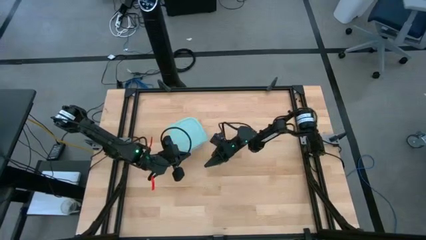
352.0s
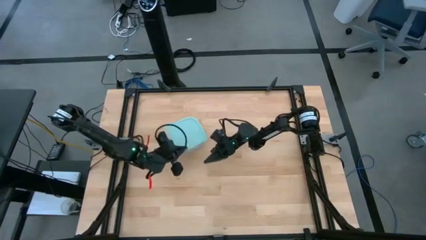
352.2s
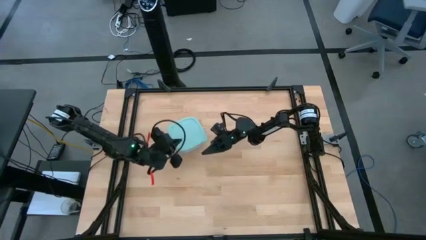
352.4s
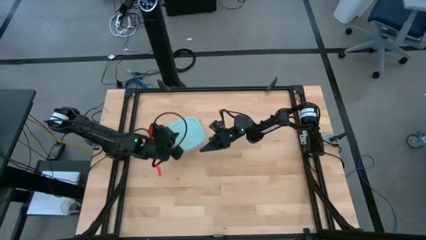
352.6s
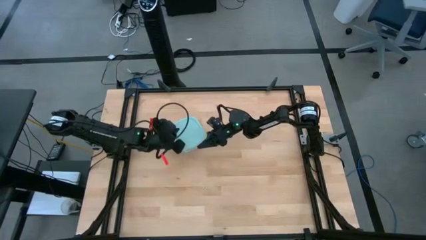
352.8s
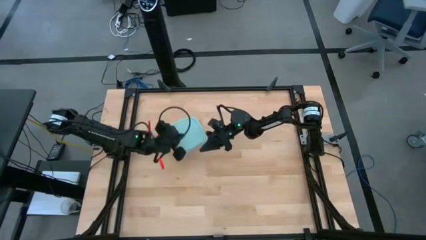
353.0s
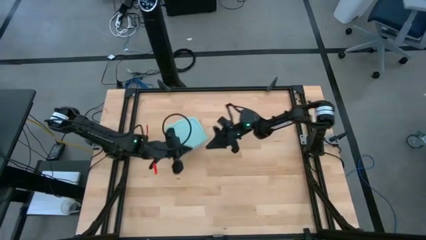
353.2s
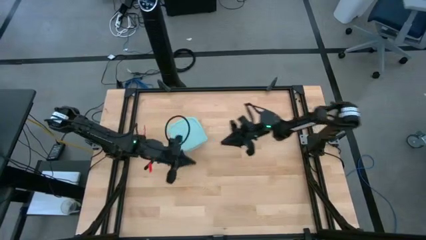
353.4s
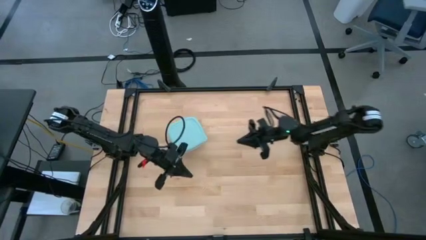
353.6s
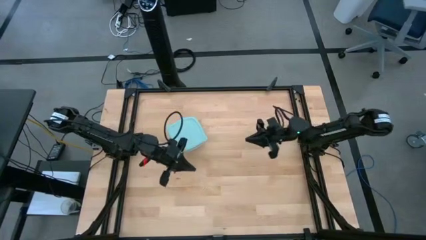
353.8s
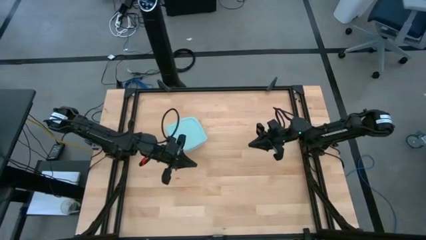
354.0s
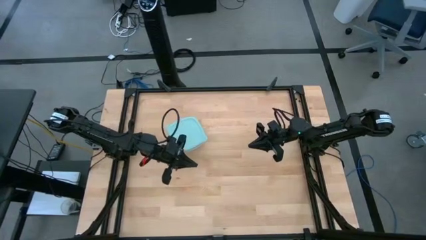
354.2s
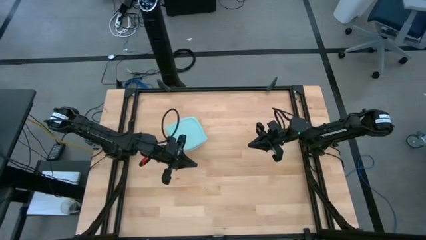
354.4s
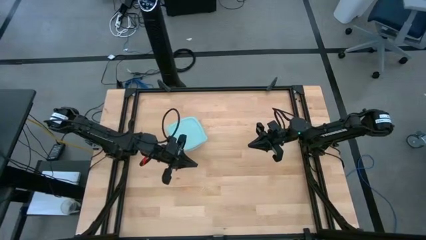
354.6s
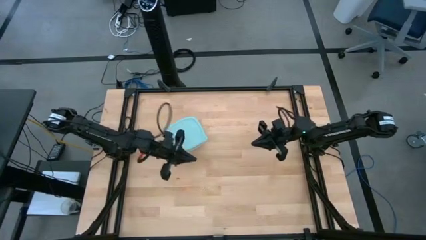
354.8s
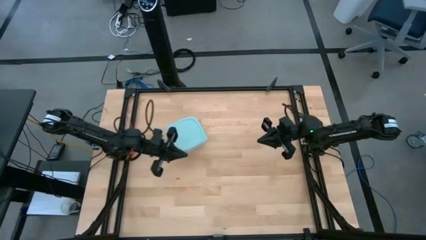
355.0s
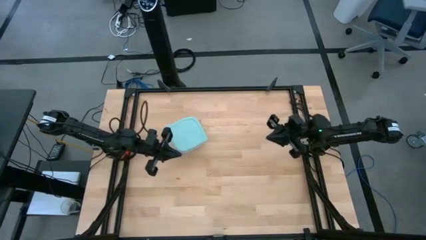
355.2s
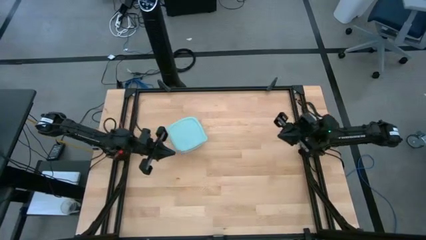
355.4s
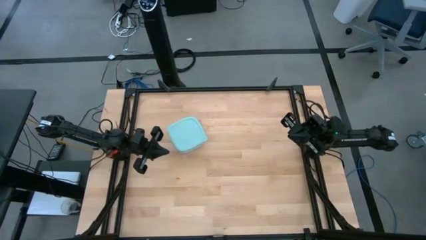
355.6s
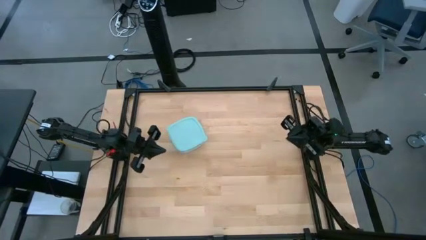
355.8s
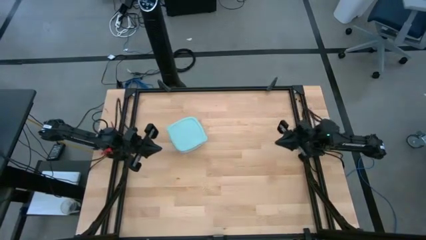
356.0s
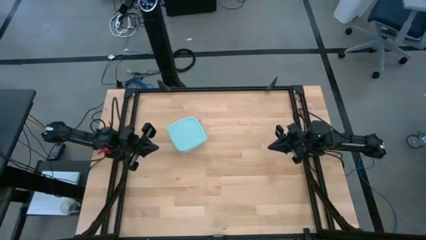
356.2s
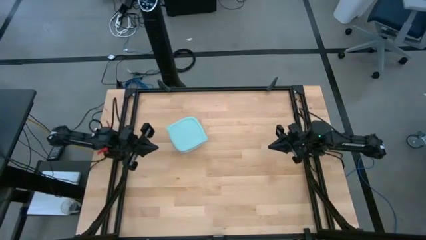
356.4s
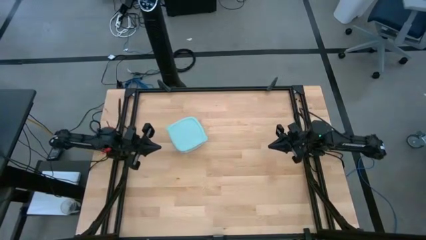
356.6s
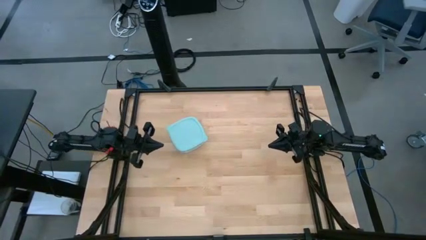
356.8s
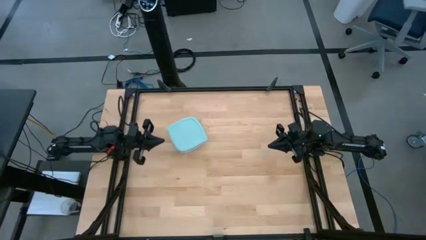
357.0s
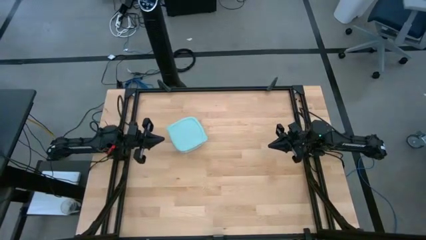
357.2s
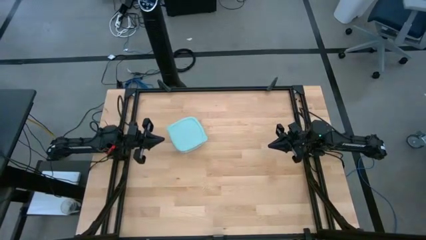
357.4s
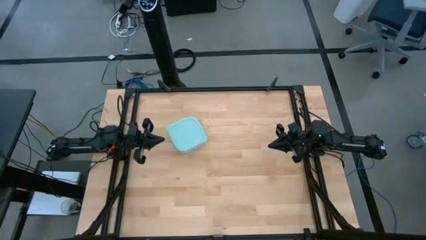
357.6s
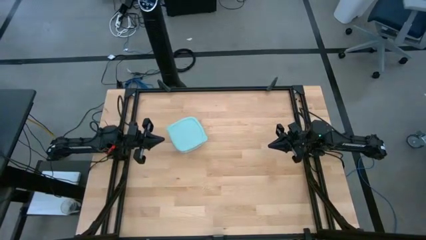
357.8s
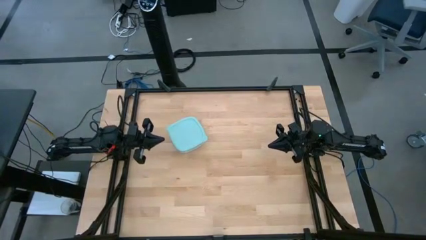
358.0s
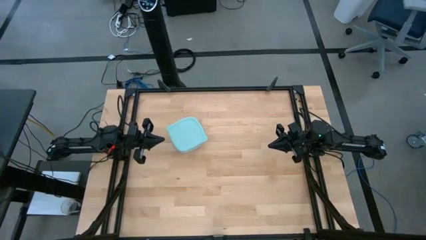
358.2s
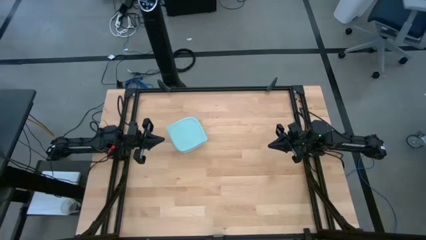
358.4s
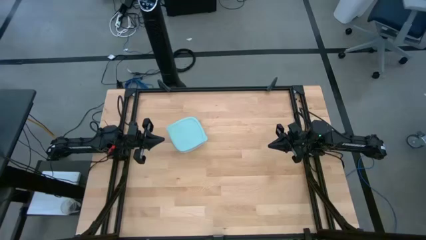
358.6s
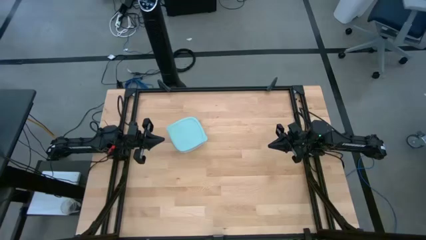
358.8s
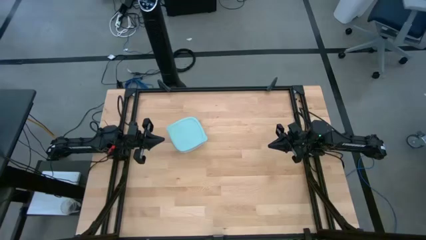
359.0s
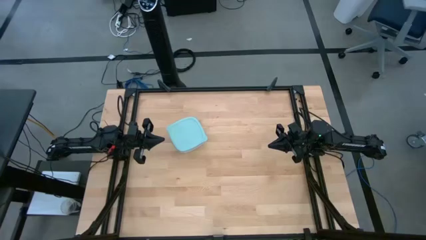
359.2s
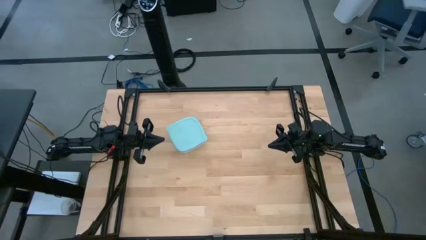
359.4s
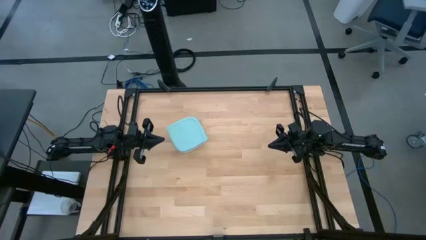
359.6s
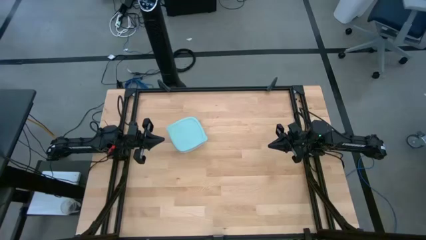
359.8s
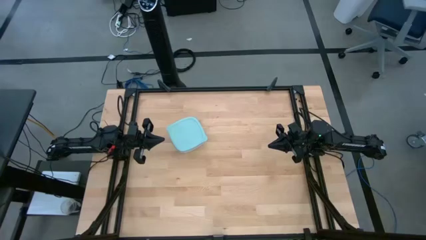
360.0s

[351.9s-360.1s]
Task: Roll bandage
Return to Home Position

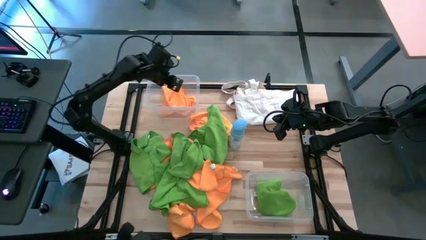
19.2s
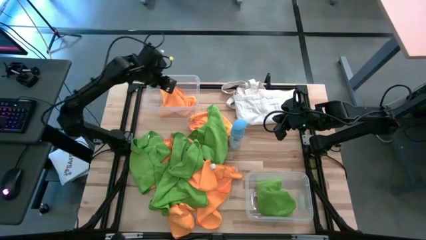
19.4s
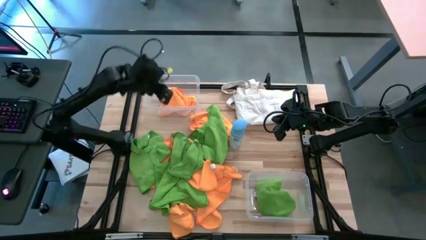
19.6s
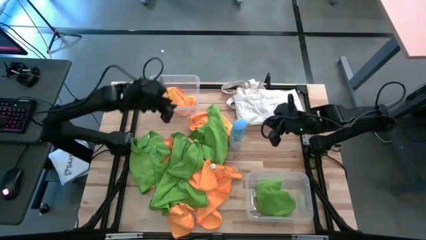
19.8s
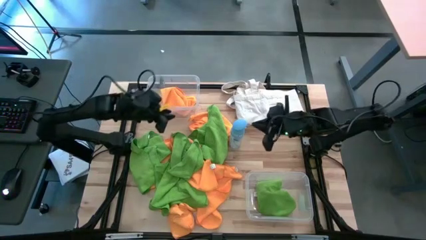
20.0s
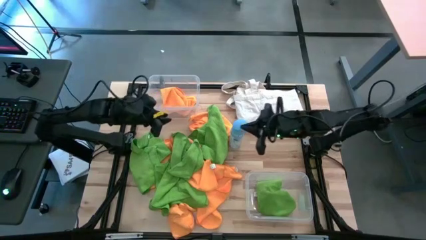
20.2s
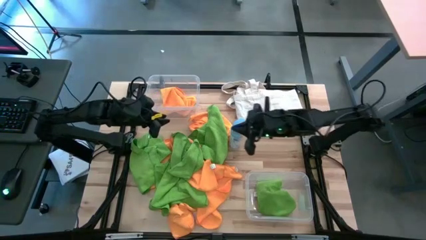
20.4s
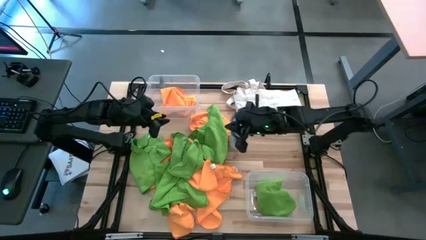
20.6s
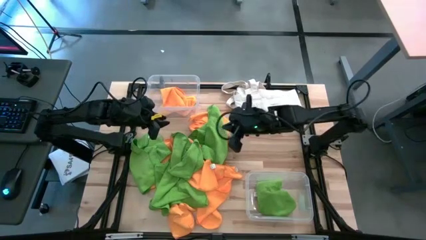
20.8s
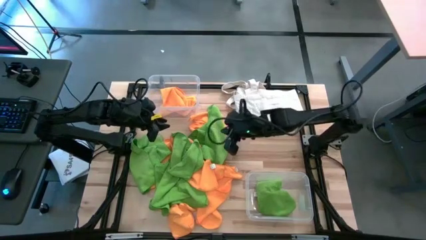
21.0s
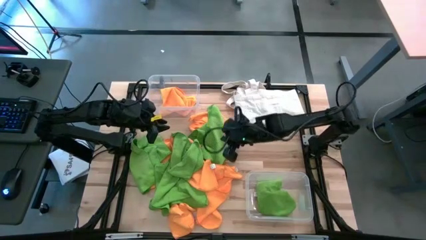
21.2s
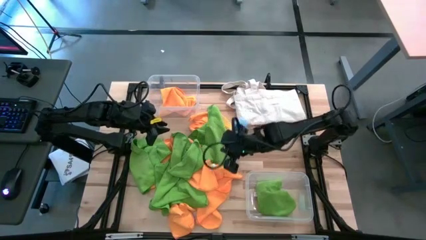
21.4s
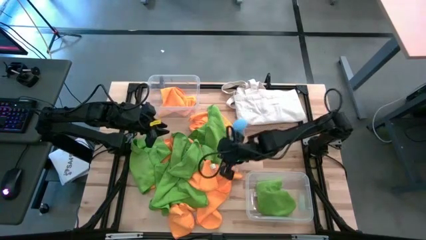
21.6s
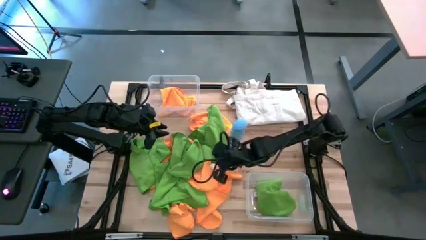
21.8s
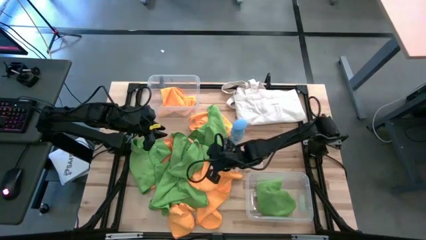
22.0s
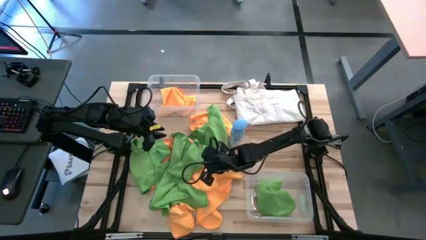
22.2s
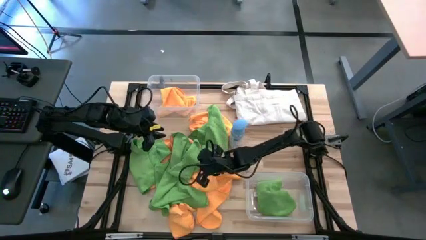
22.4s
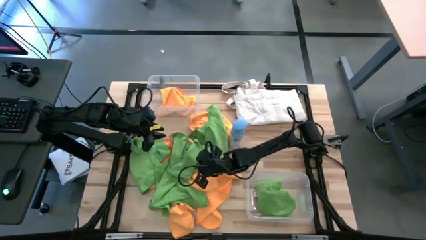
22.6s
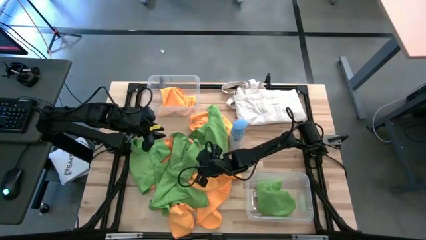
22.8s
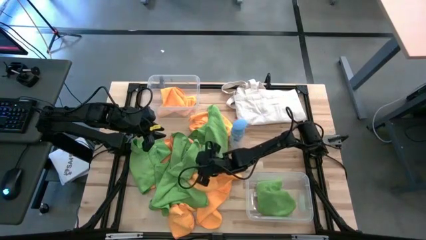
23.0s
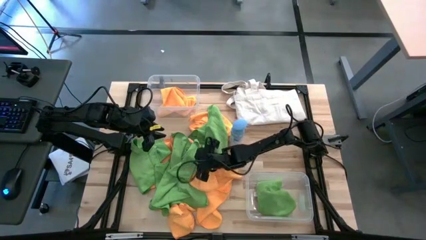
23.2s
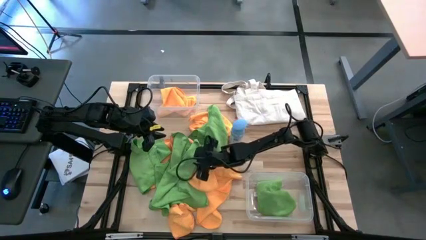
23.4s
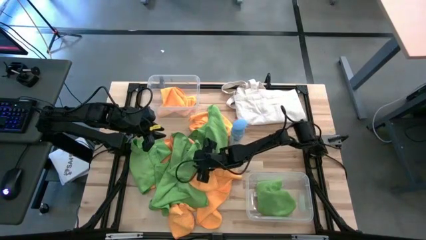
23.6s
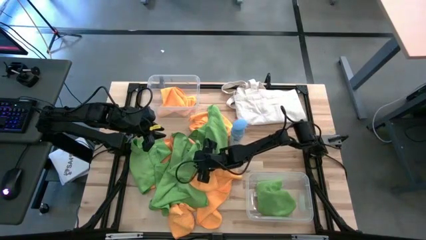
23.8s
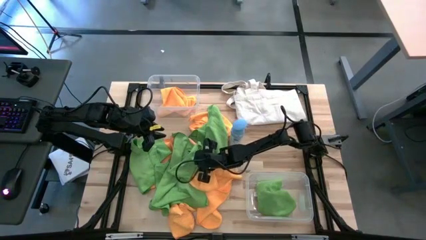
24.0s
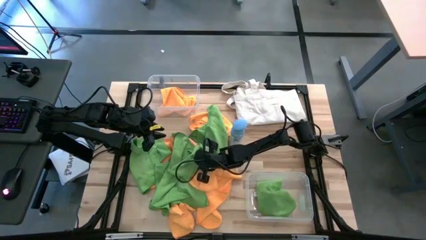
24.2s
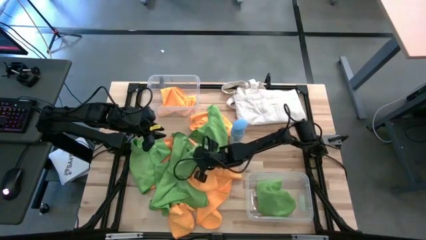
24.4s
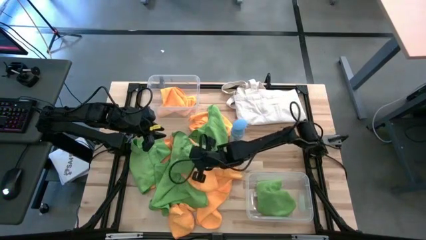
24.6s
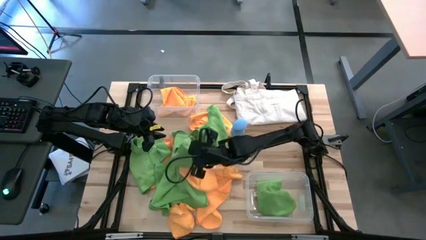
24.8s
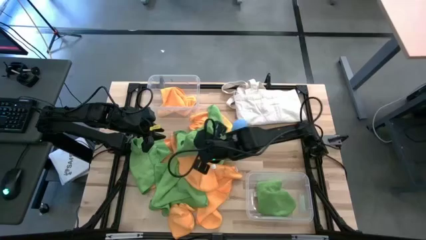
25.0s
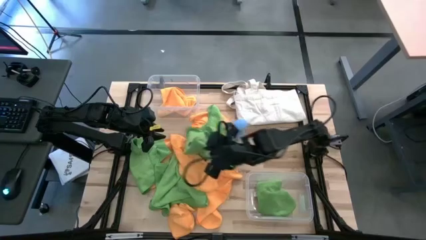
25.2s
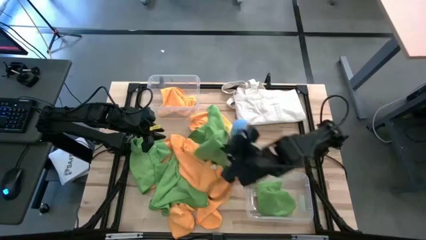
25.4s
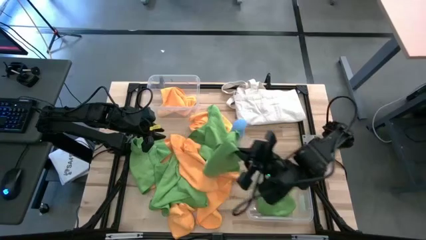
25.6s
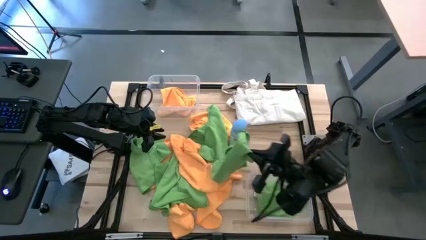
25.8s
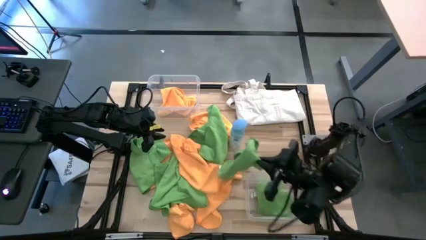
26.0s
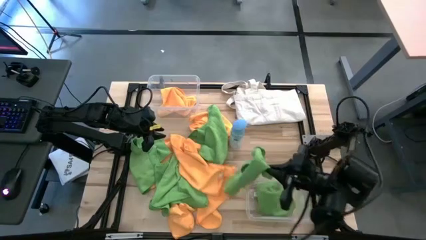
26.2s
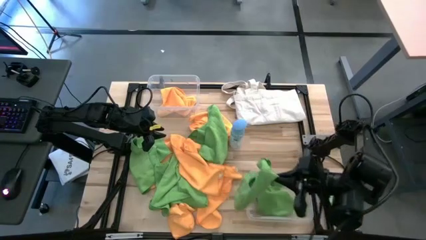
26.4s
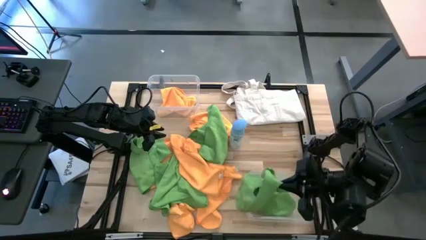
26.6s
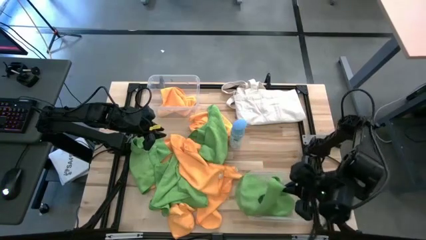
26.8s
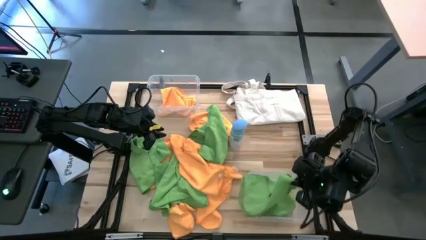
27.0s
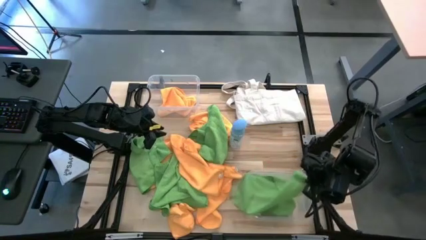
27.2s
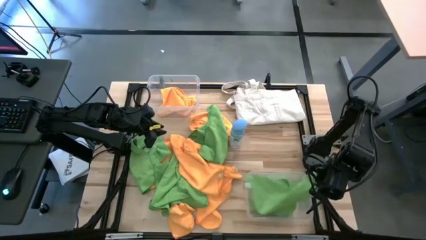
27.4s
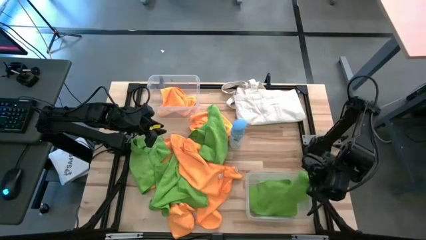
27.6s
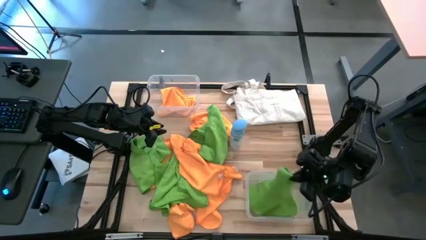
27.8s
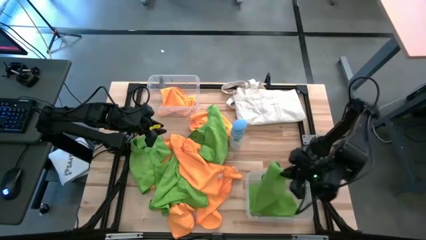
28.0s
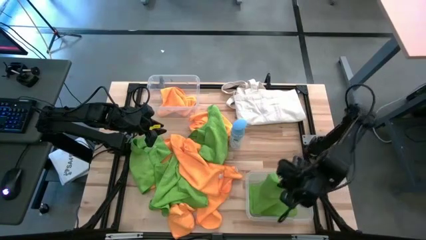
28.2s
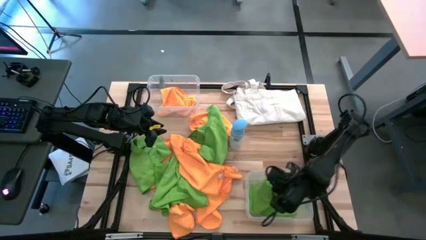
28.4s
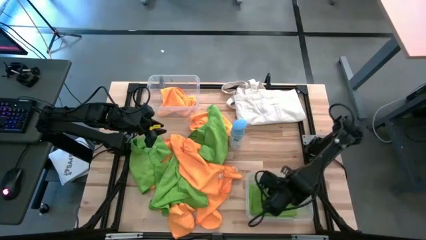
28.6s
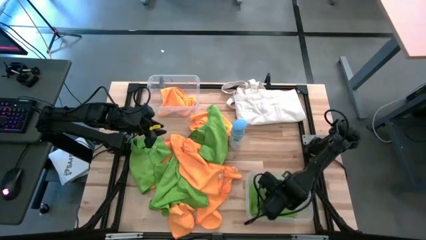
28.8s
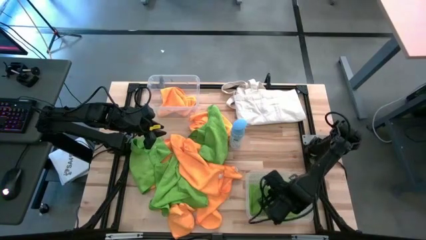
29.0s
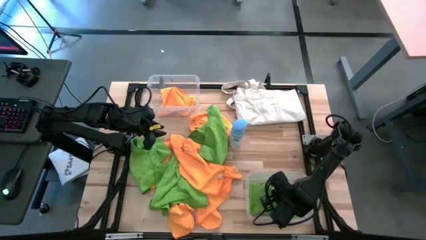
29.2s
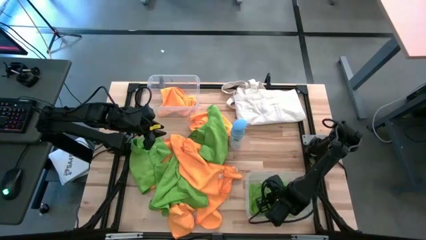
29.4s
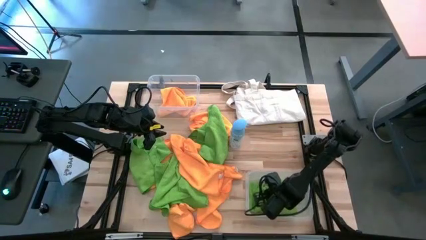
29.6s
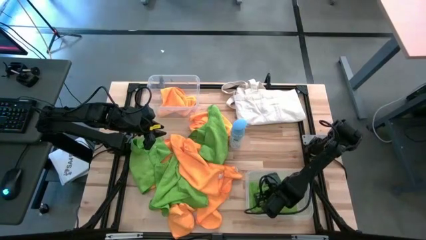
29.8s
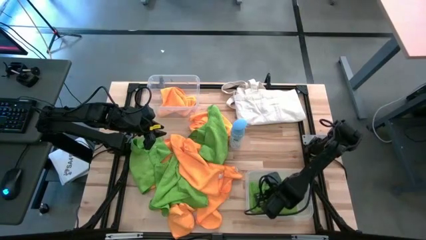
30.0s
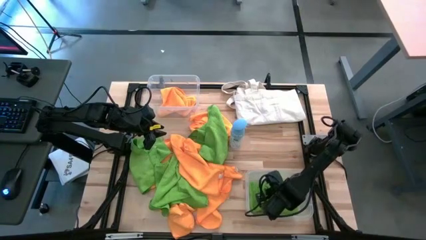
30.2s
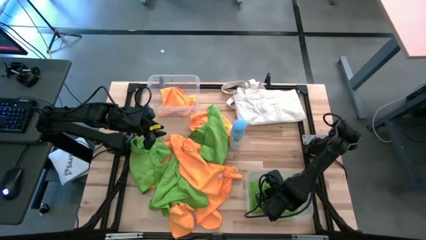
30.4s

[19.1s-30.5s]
Task: Sort microfiber towel by color & place in baskets
Put the green microfiber towel into the bottom transparent bin
